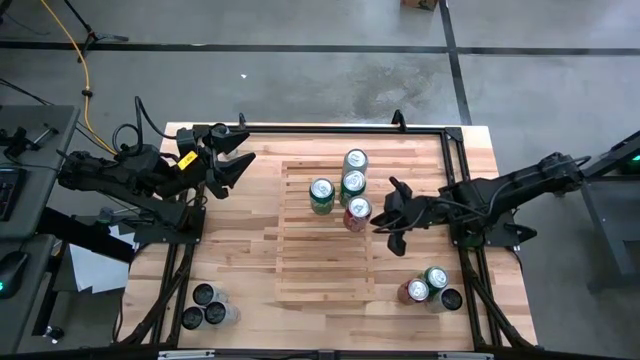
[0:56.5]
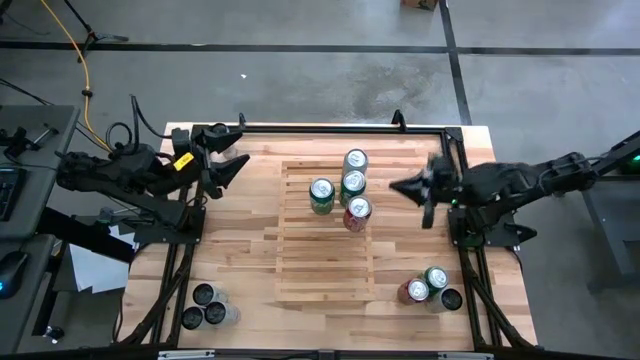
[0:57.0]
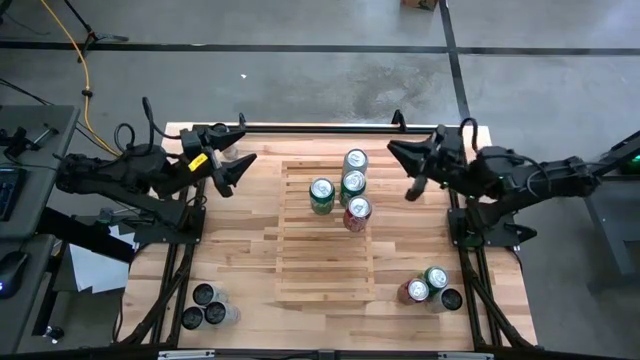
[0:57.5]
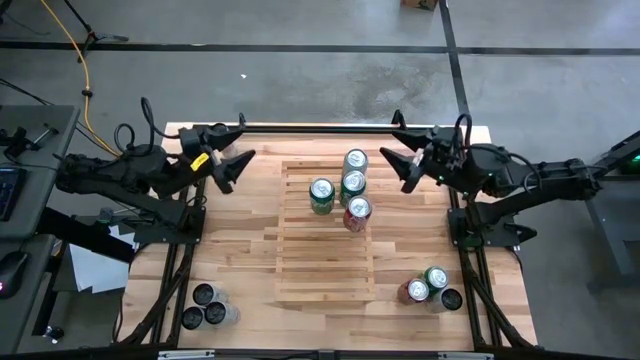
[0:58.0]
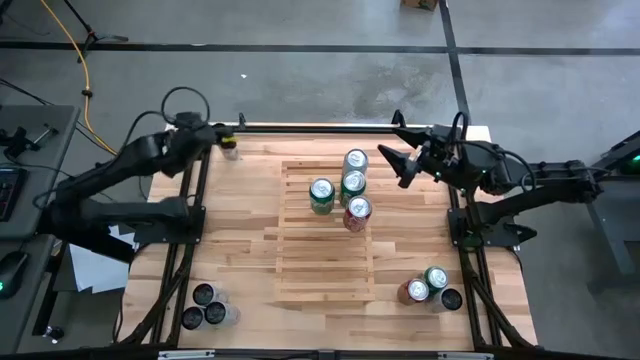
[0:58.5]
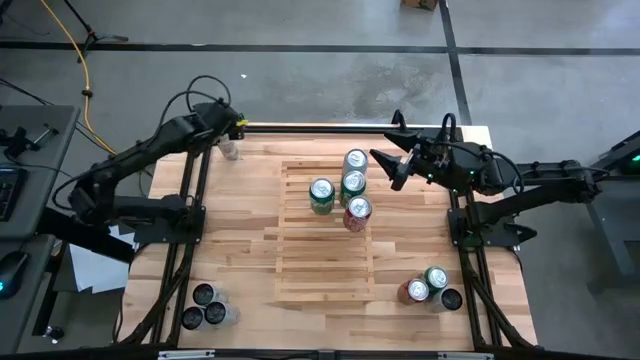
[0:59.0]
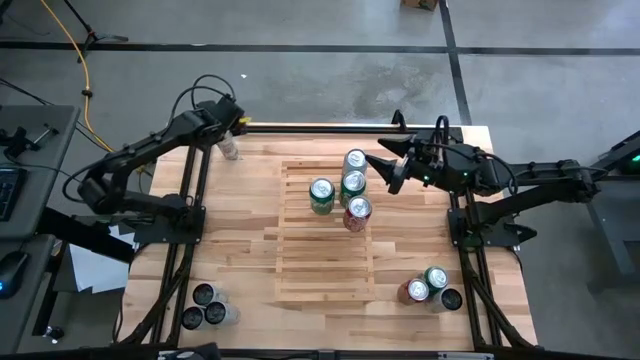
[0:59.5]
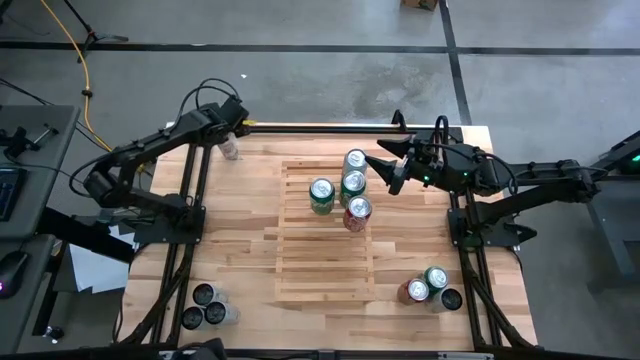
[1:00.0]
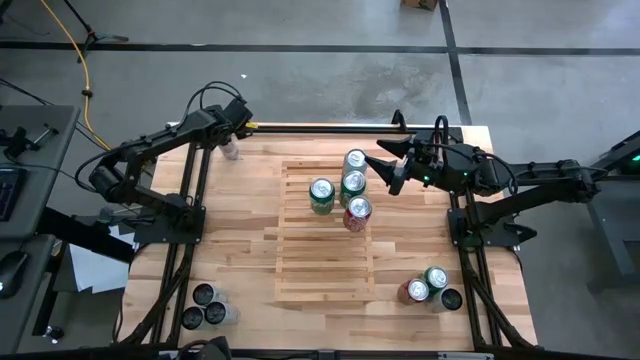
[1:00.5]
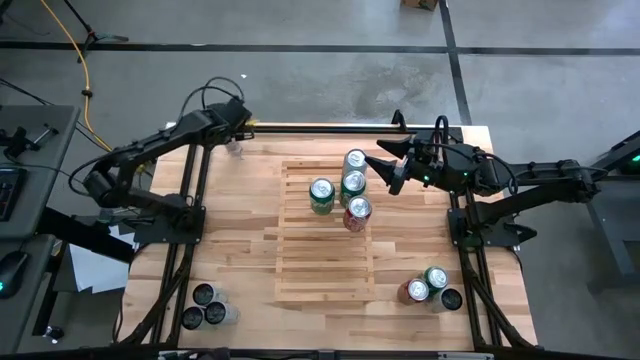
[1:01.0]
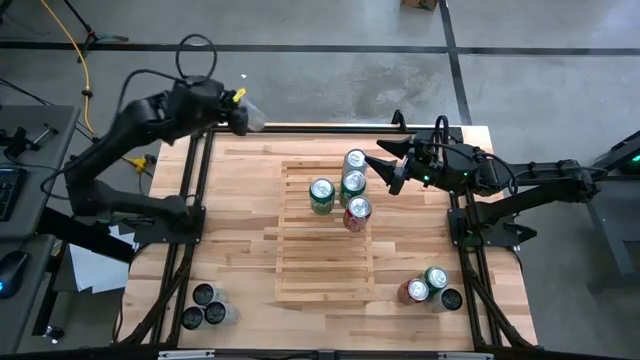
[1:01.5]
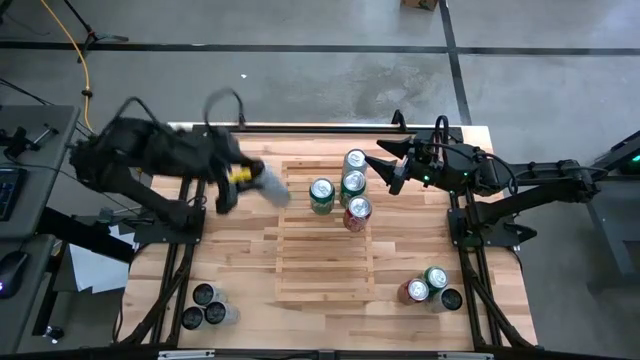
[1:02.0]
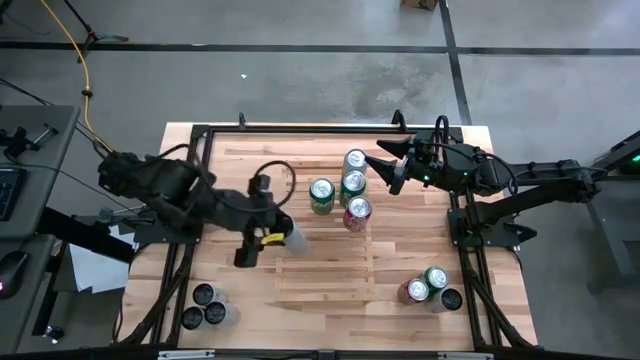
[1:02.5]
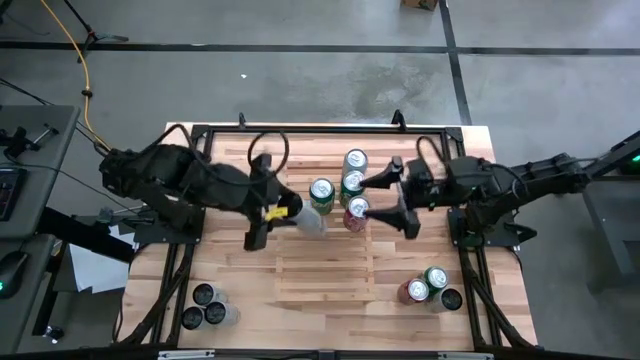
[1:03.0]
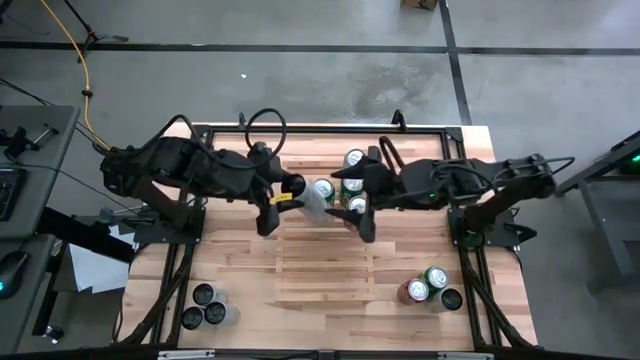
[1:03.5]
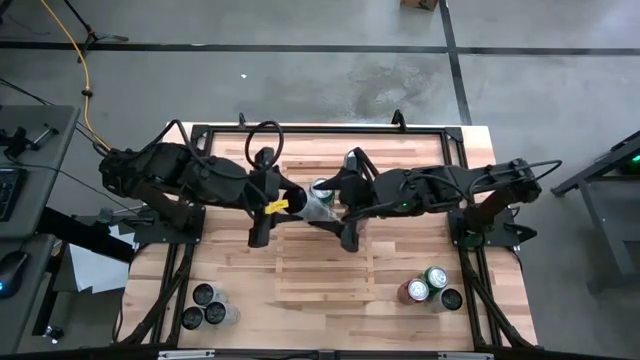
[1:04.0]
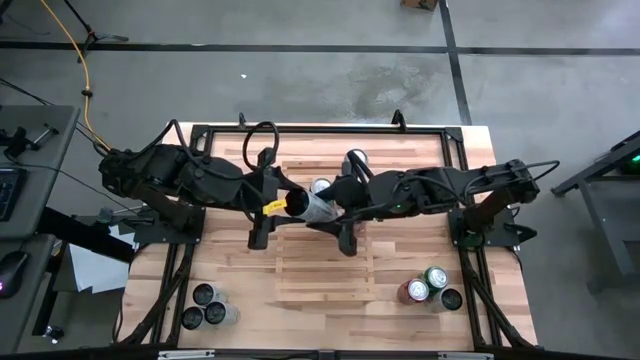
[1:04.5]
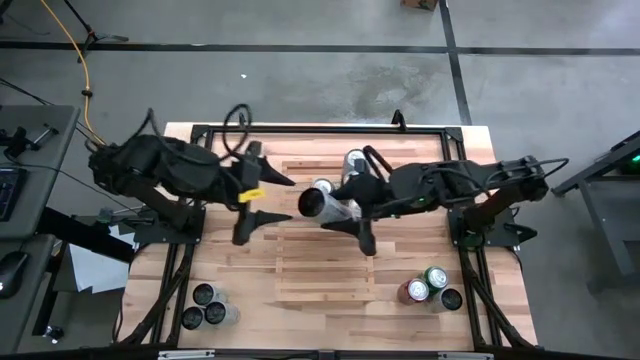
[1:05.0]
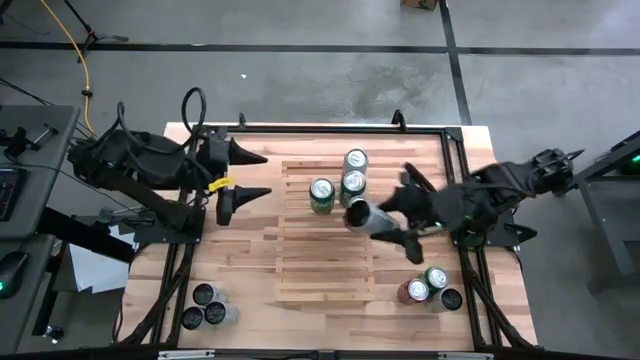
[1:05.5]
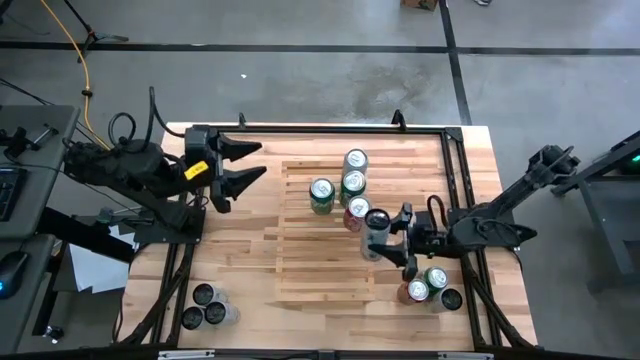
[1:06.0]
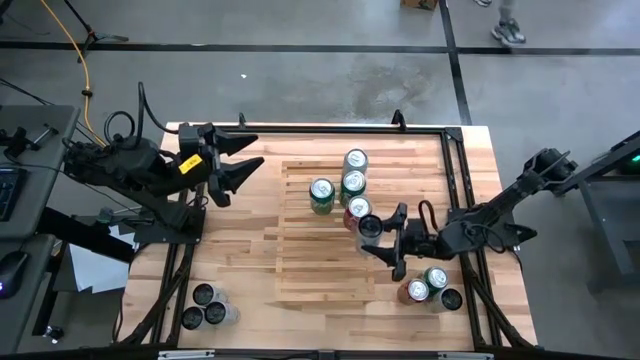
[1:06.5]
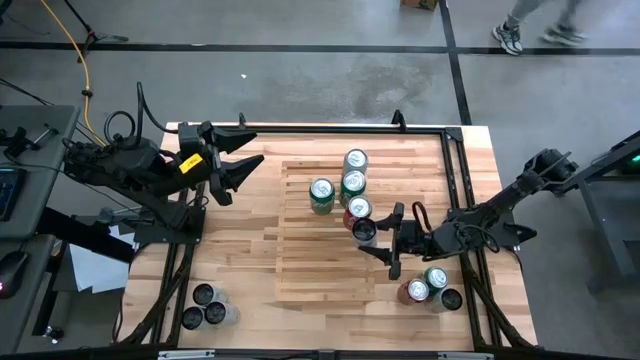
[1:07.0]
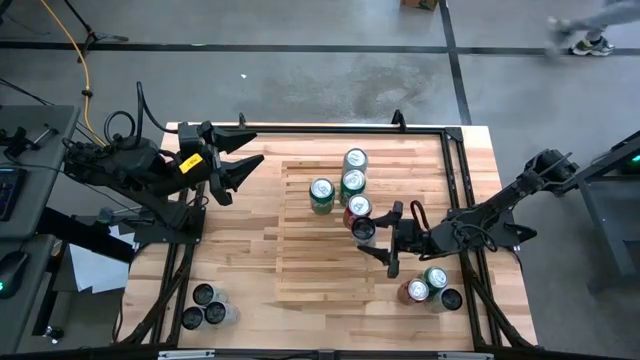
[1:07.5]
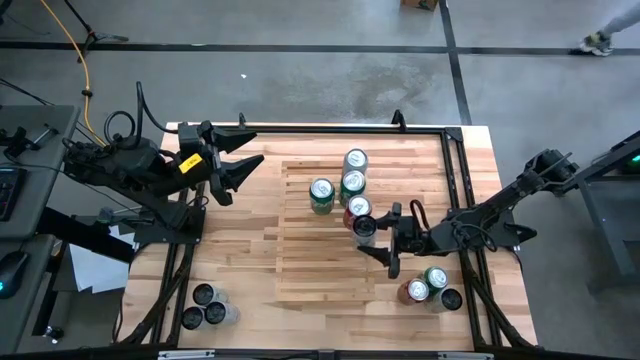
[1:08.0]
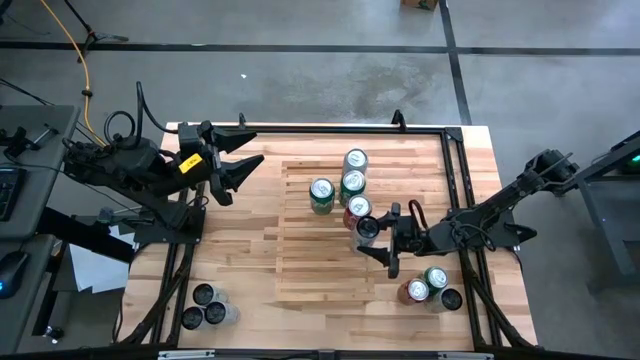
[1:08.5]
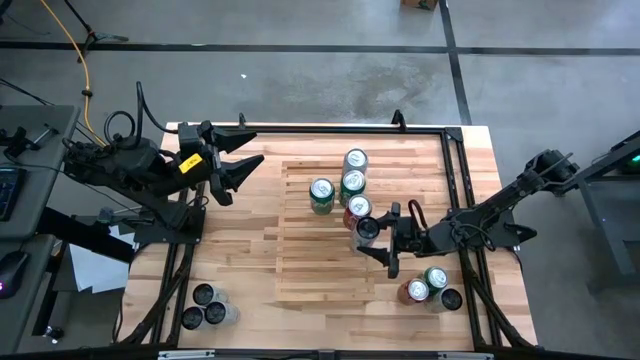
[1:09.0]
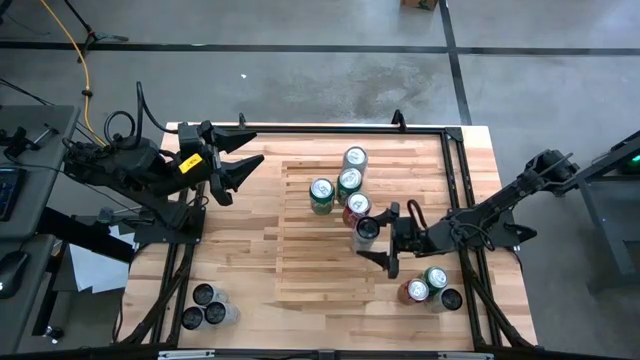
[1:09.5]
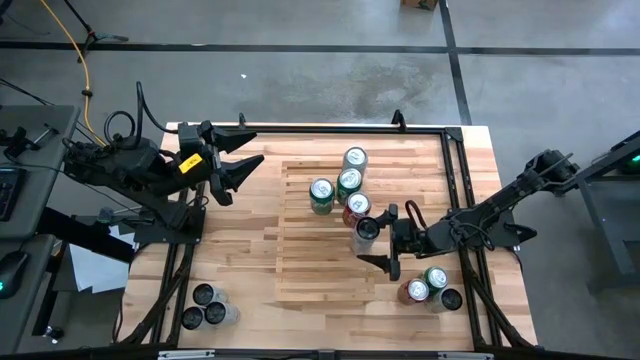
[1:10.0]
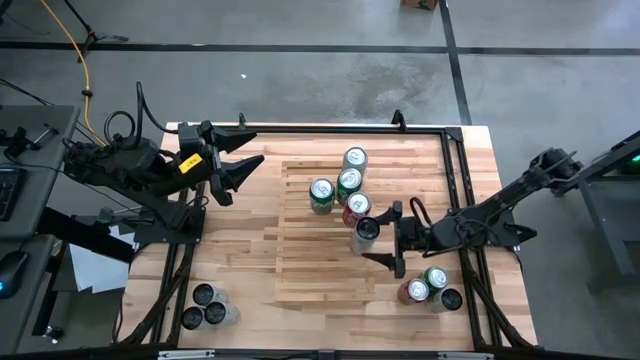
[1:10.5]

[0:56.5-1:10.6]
Task: Place canned beverage on shelf
Put the top white pink soda can on the shelf

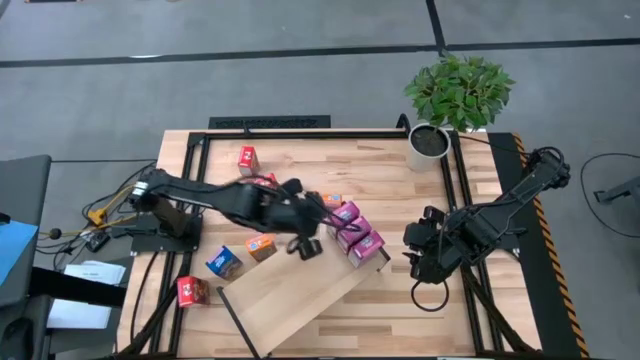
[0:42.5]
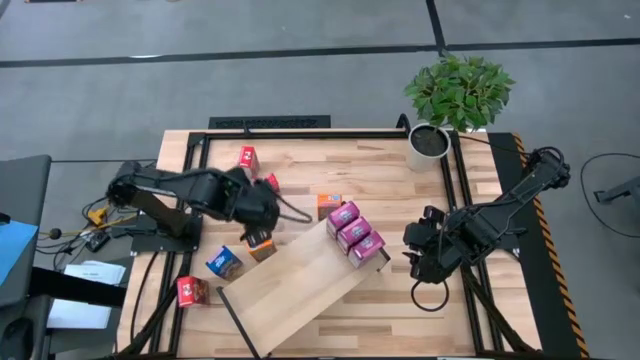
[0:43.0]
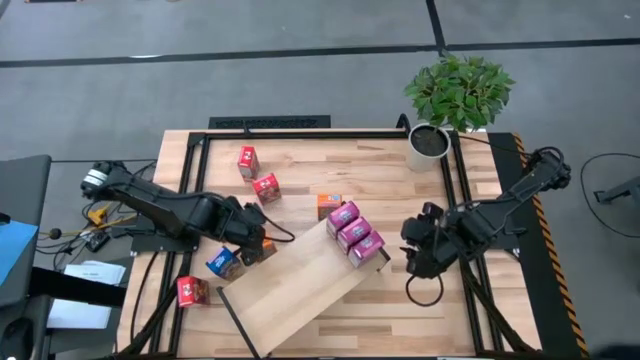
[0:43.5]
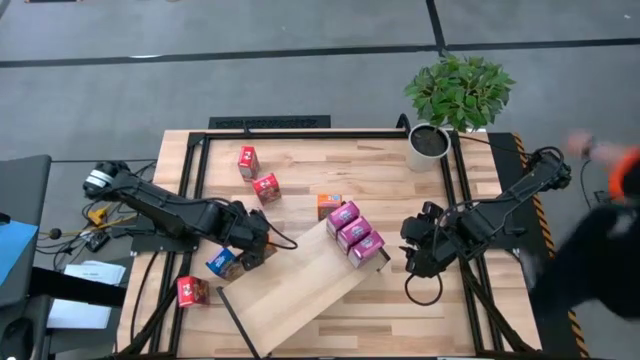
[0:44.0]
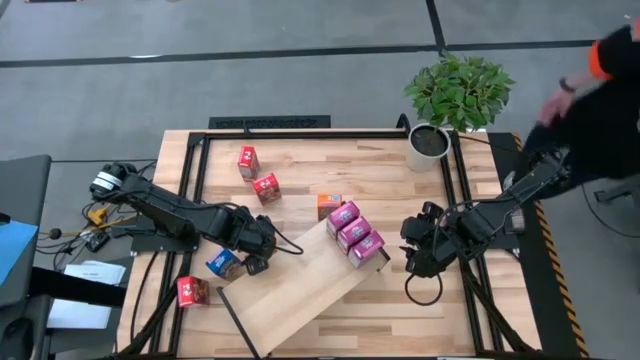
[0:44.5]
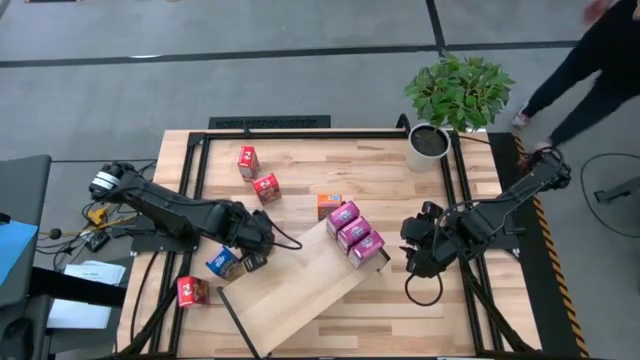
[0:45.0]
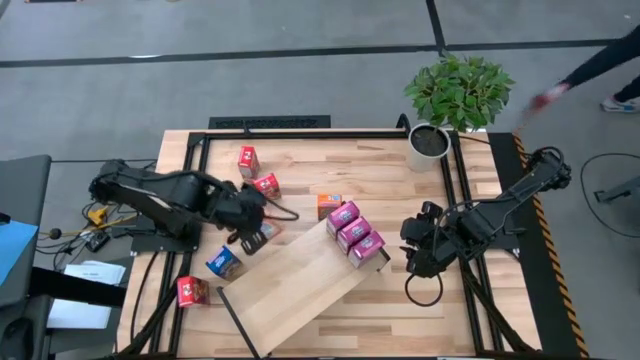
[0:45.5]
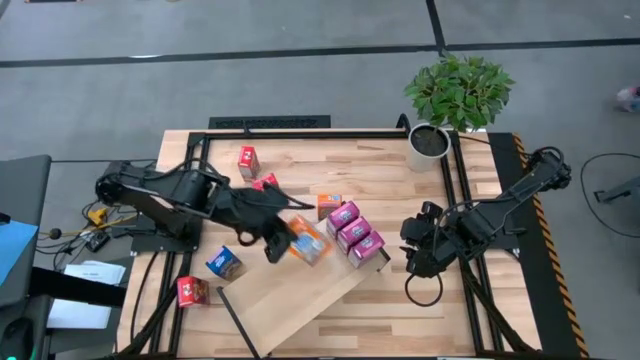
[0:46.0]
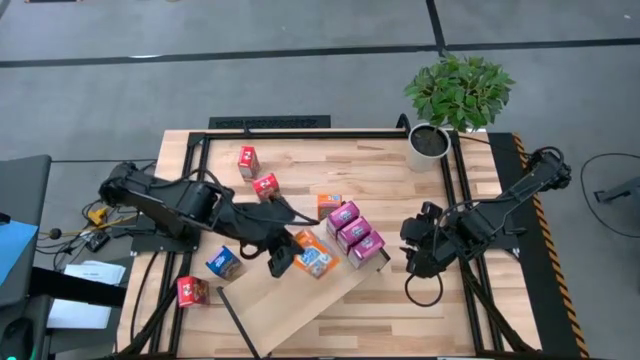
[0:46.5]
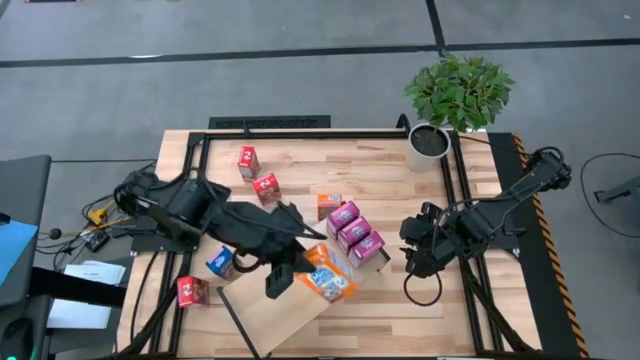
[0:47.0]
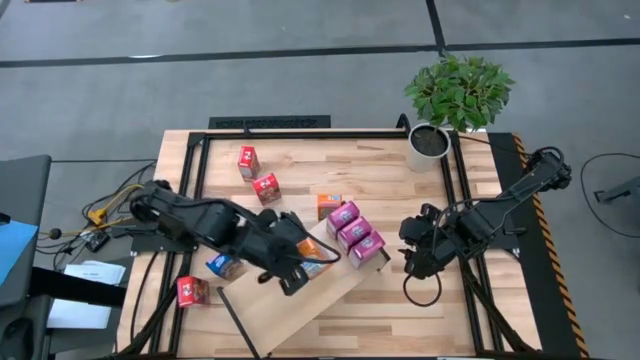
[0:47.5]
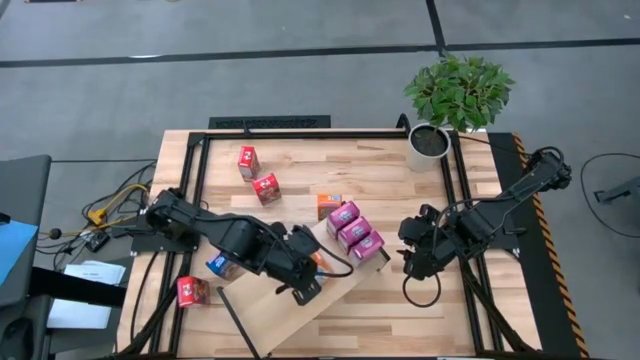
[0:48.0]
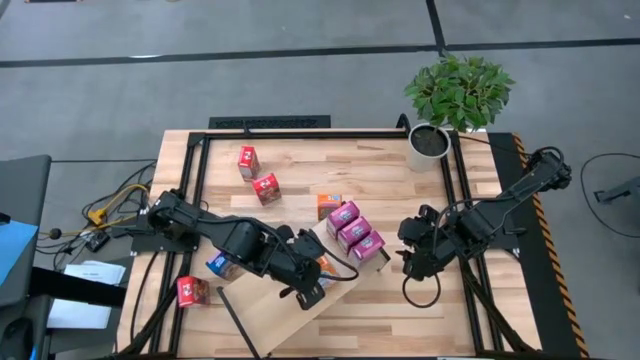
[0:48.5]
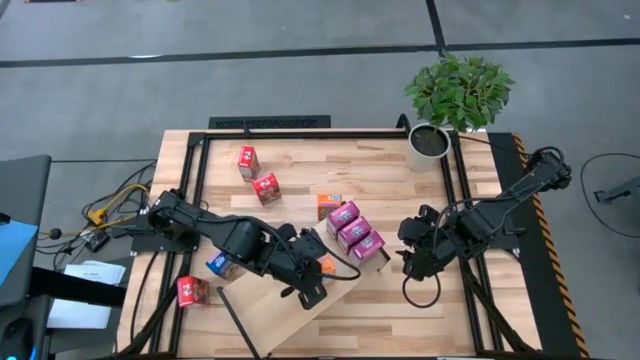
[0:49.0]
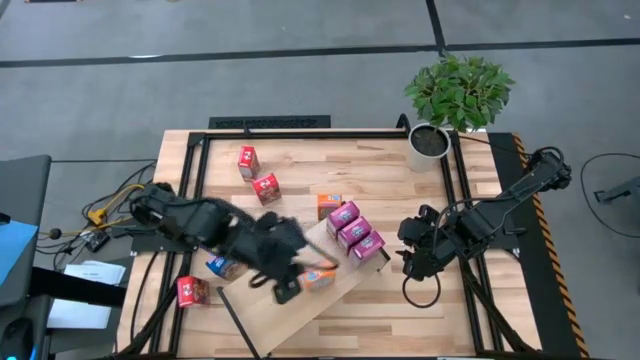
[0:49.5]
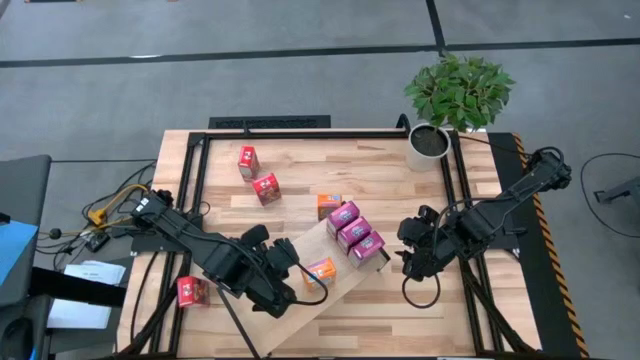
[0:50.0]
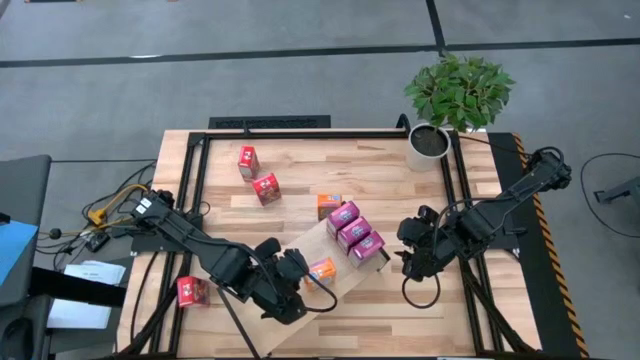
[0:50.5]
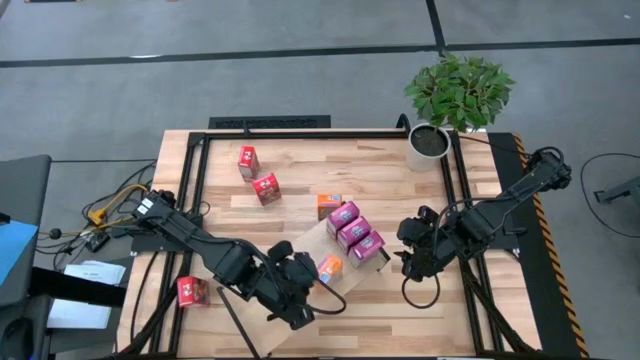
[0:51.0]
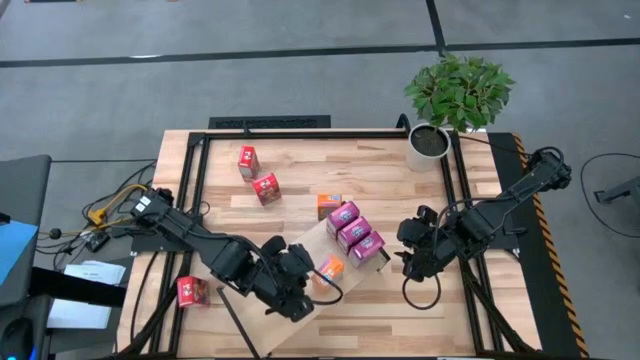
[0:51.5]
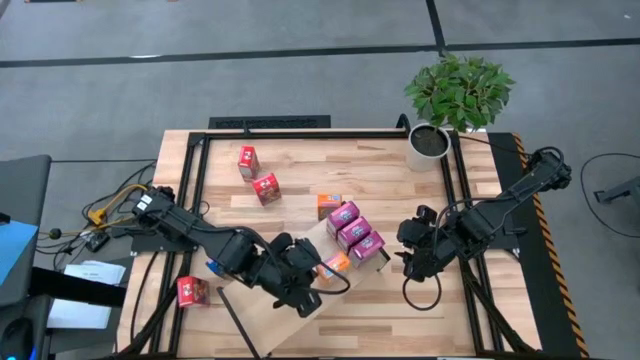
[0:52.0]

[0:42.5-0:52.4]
Task: Stack cereal on shelf
Put the left orange cereal box onto the shelf
